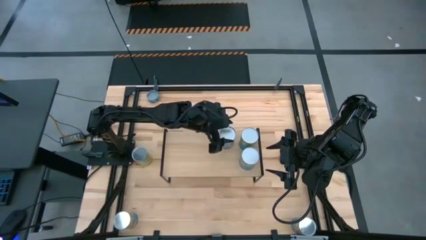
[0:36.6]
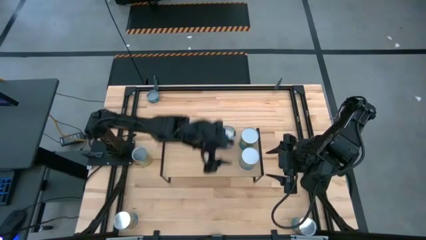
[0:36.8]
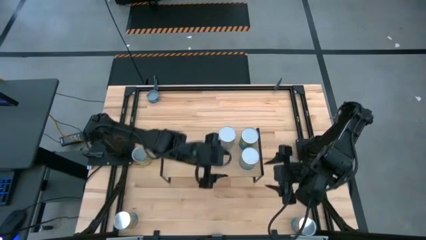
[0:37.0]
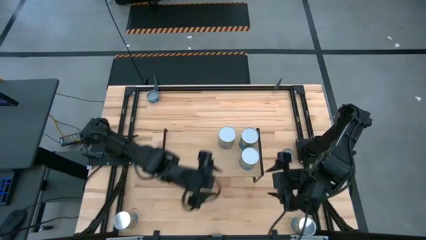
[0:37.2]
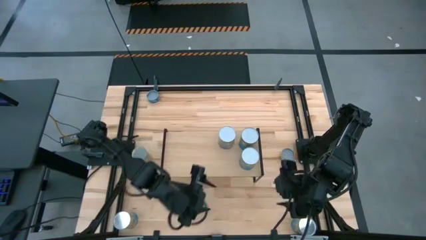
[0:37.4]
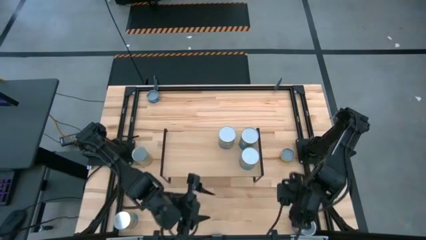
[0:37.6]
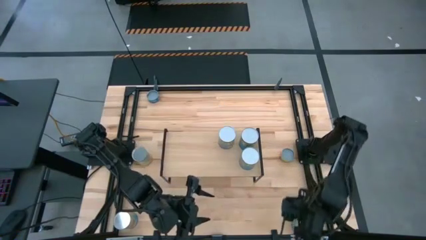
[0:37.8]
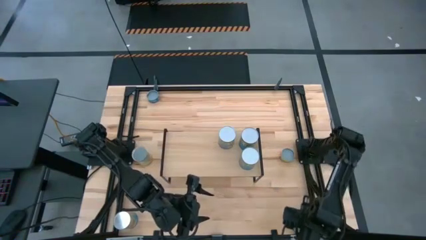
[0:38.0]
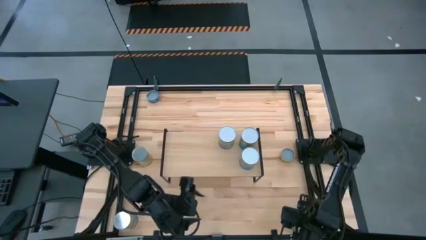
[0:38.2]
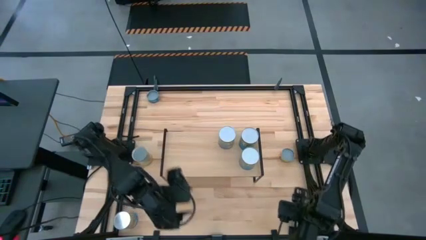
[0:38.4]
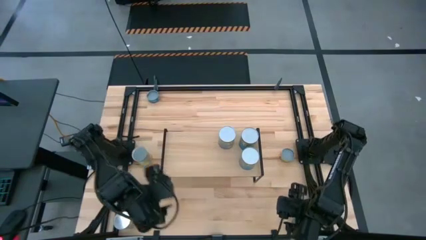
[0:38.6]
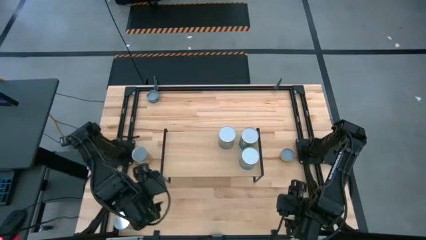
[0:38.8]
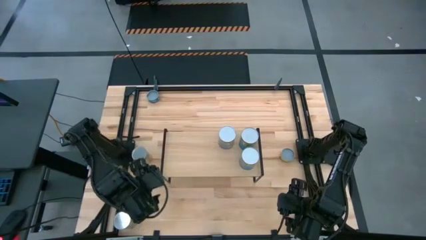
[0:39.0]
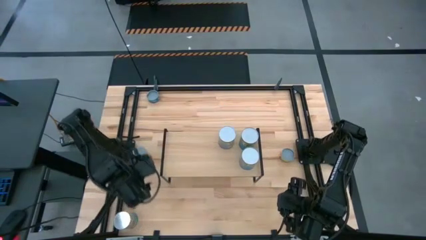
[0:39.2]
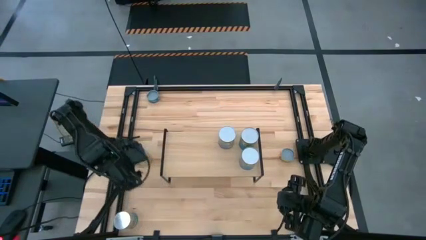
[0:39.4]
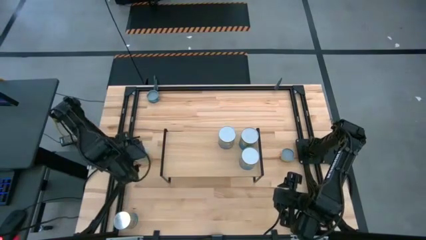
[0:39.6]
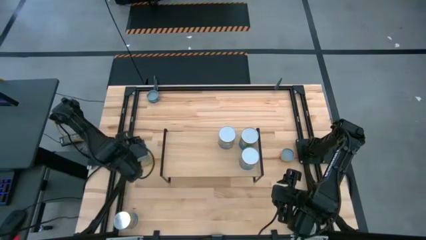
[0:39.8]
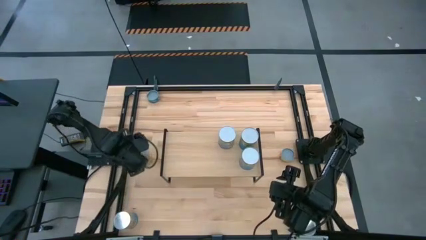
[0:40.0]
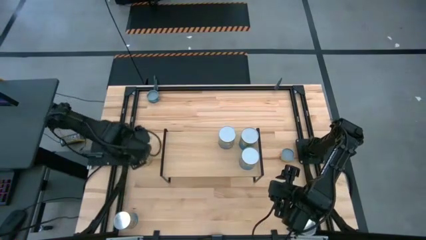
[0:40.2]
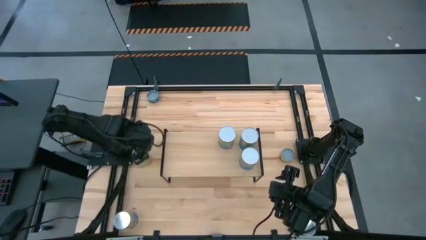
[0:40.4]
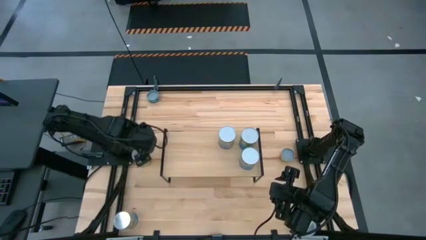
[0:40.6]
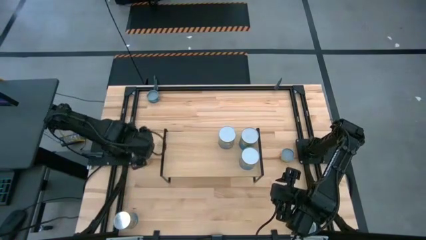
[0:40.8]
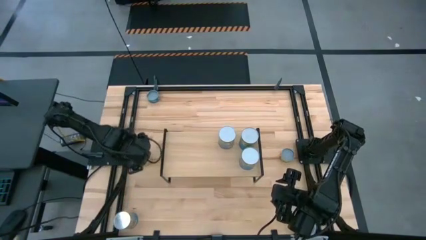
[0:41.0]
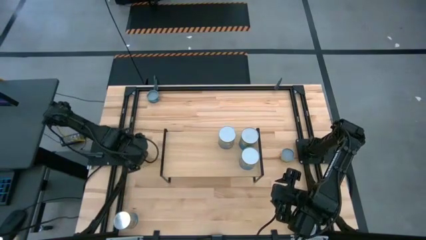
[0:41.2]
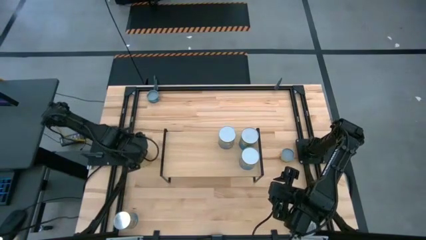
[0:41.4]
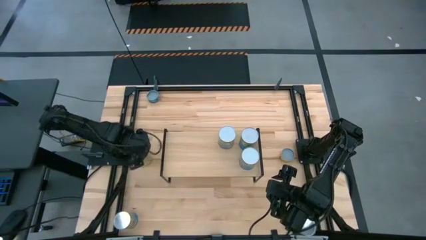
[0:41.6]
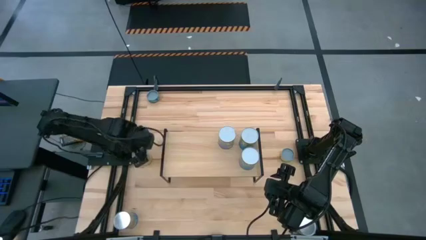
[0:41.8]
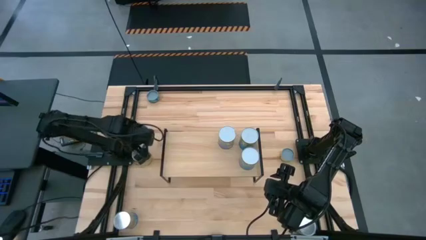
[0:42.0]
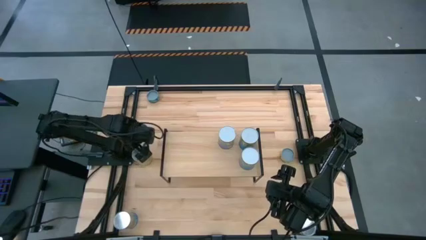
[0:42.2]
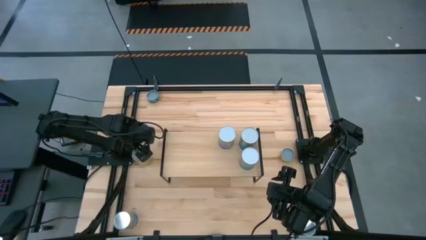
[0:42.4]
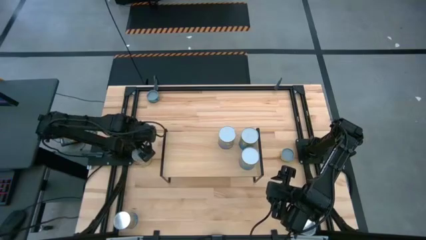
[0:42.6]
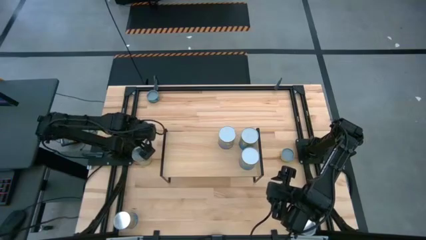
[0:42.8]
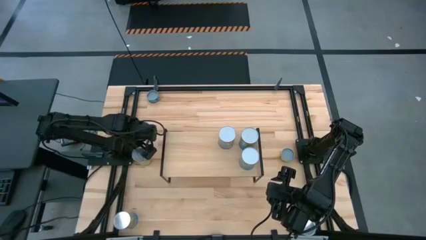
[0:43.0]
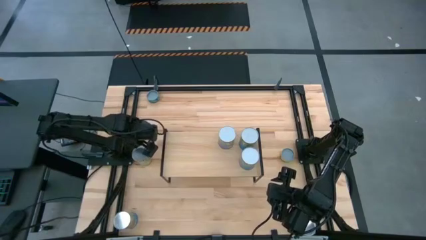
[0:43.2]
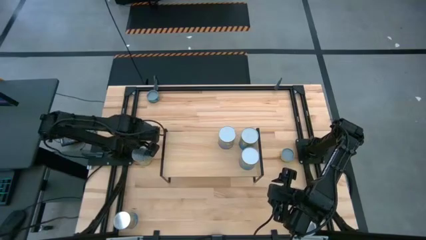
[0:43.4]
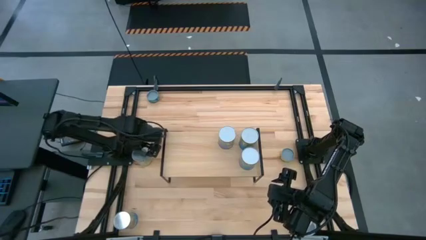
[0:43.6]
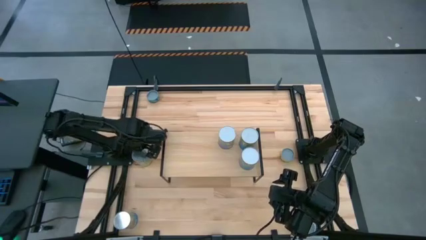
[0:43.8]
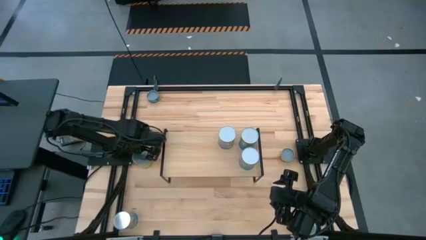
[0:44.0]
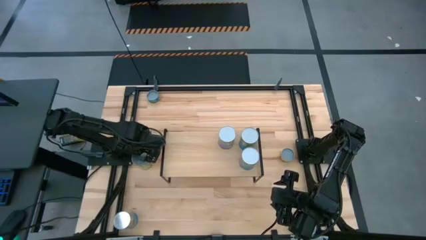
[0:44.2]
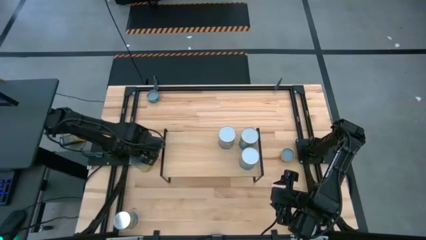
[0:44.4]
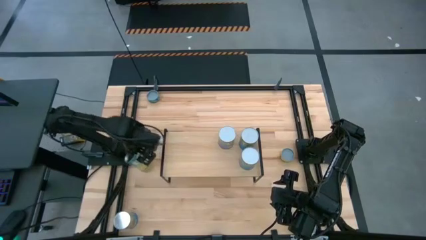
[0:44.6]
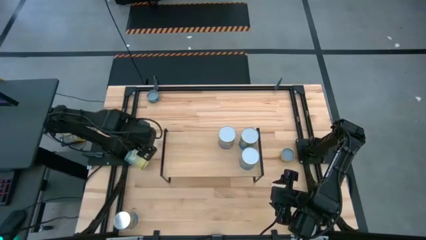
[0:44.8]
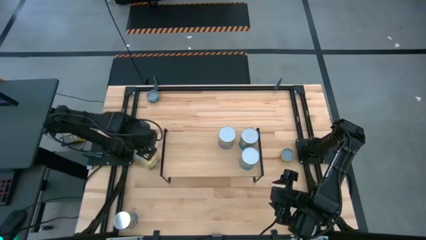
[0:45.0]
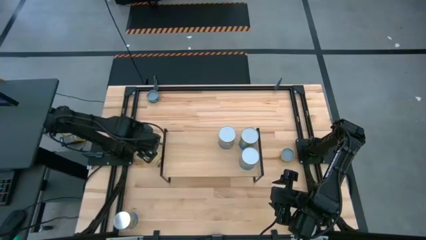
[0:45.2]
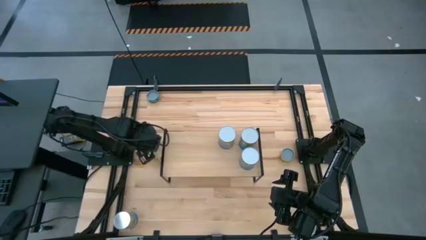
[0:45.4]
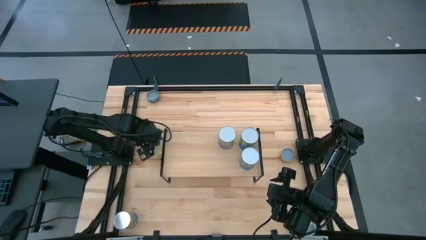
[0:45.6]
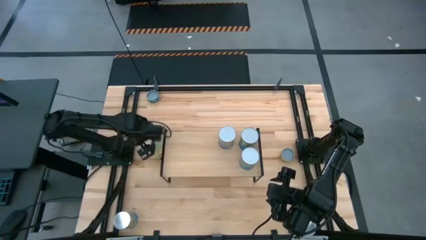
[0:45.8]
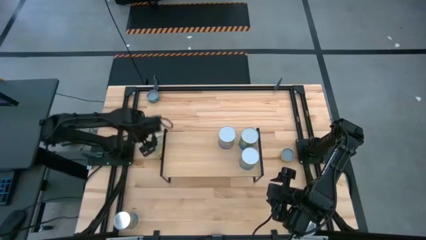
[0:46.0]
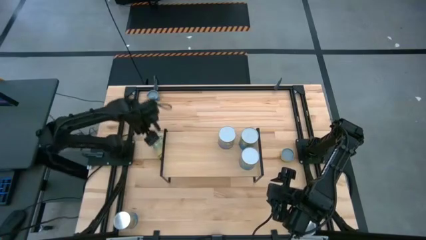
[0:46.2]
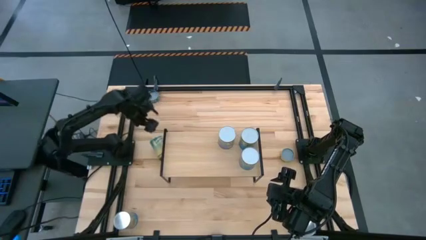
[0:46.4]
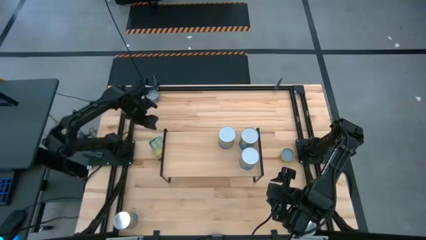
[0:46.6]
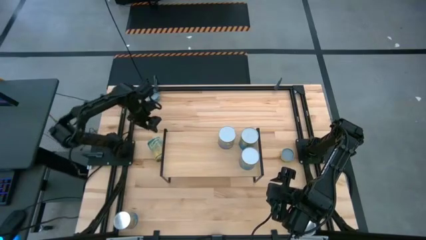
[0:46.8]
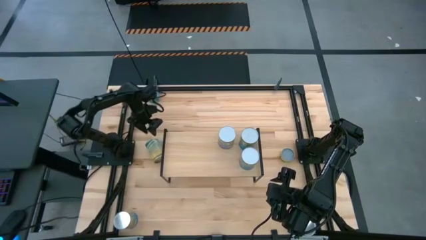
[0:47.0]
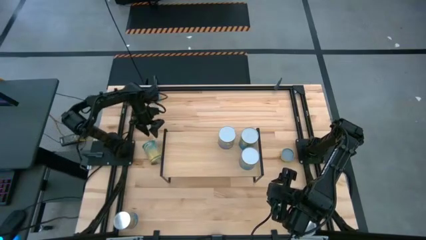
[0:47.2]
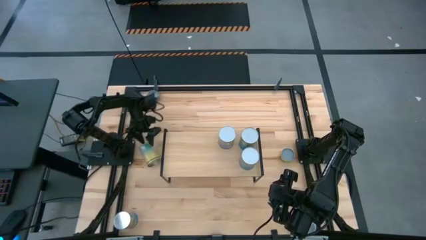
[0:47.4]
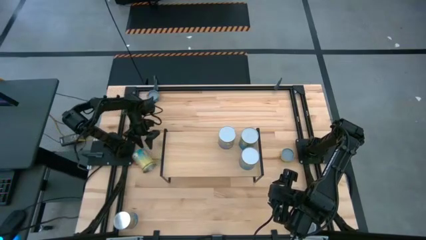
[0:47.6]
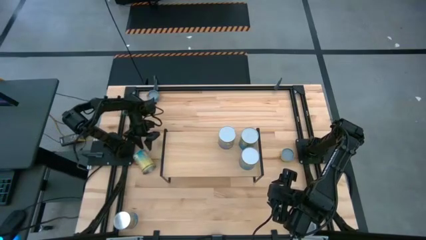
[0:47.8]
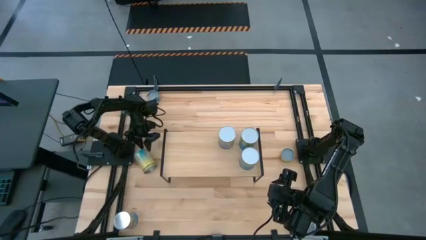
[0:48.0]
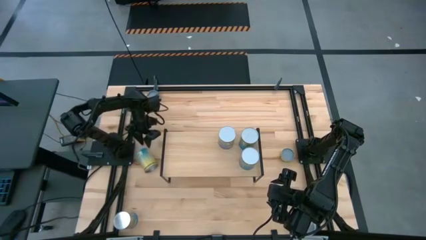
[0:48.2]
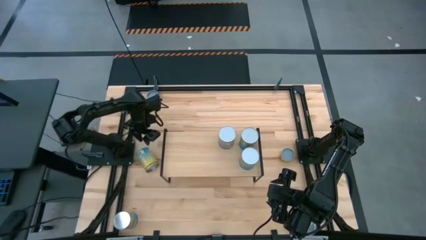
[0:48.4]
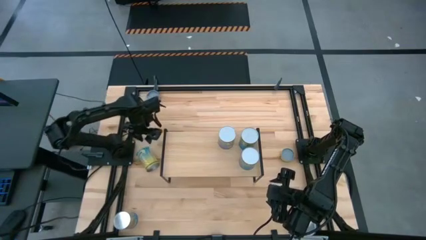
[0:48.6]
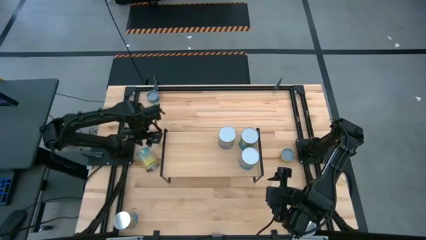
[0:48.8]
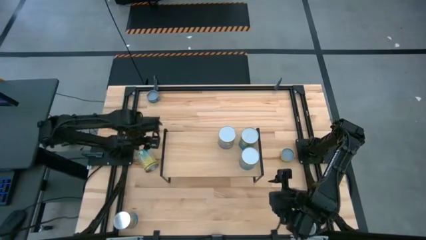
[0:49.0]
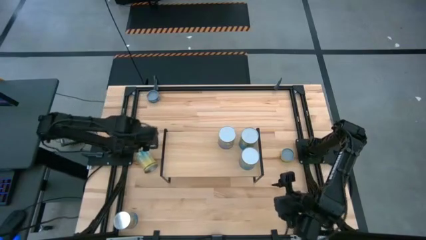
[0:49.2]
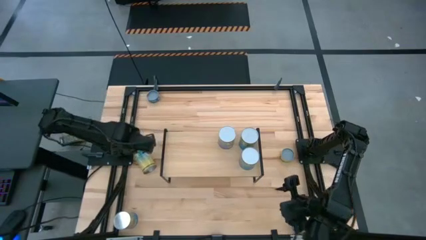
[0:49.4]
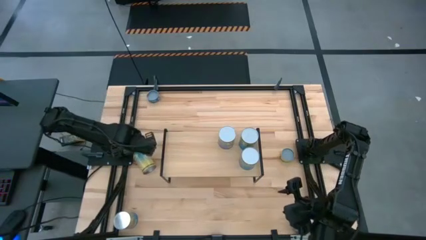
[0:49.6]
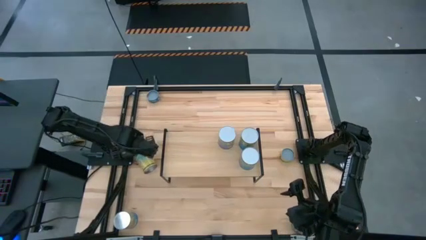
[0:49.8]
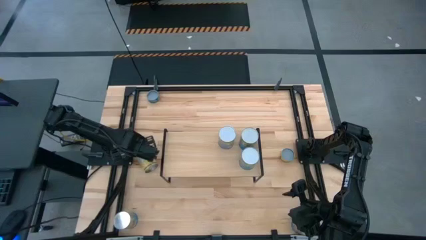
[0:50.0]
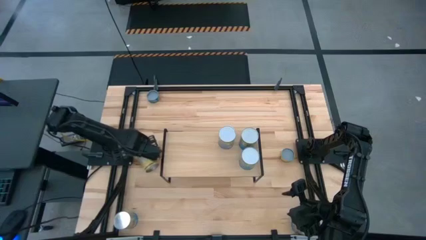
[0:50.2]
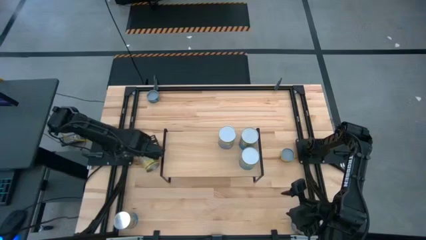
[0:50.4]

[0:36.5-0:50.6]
Task: Pick and place cans onto a shelf
Put the canned carrots on the shelf

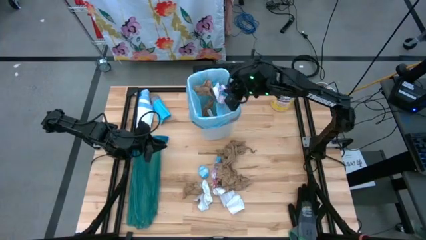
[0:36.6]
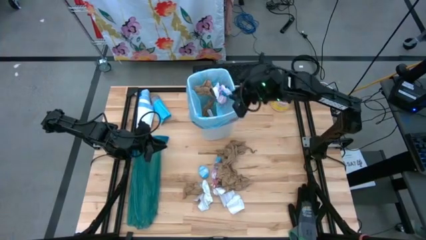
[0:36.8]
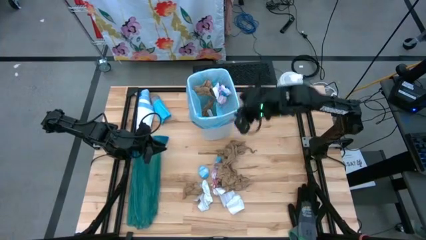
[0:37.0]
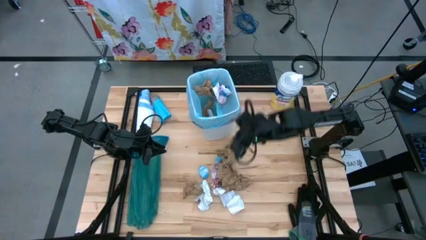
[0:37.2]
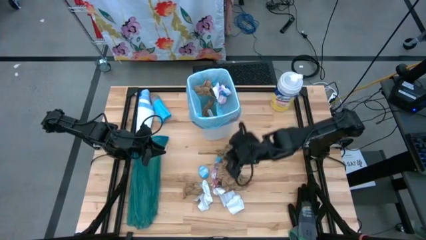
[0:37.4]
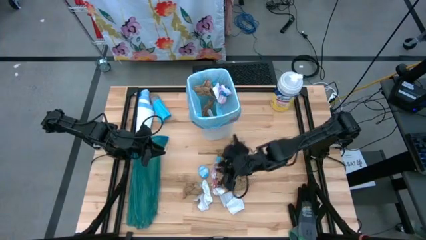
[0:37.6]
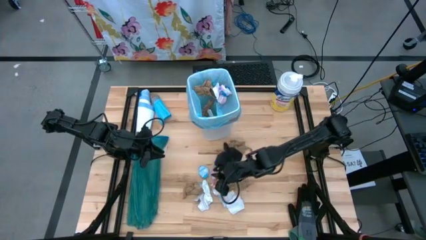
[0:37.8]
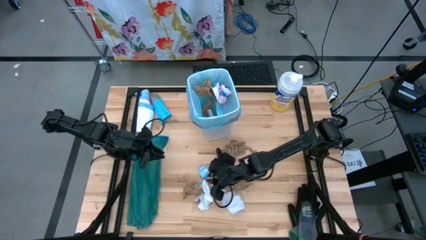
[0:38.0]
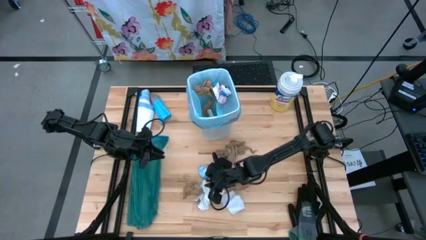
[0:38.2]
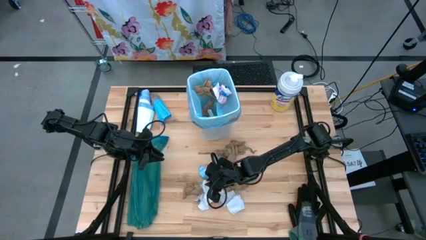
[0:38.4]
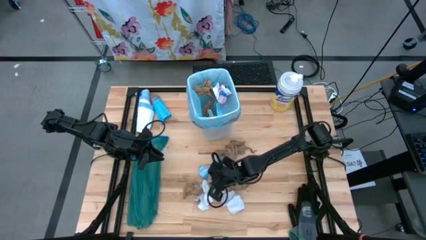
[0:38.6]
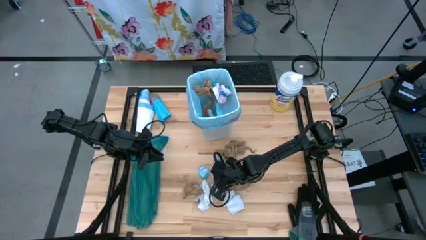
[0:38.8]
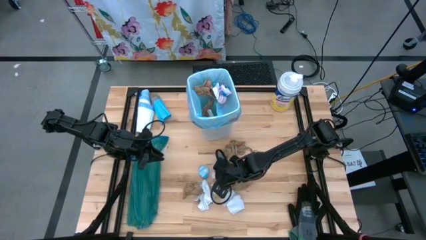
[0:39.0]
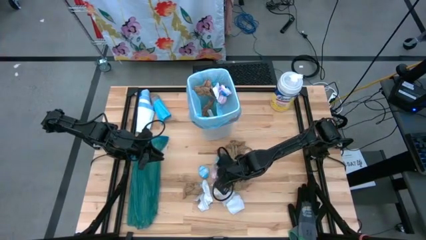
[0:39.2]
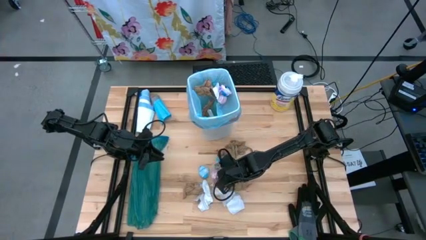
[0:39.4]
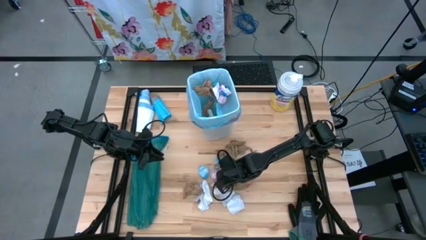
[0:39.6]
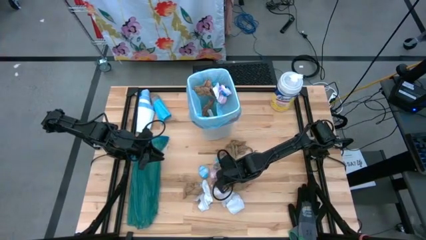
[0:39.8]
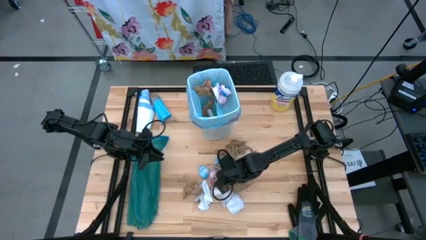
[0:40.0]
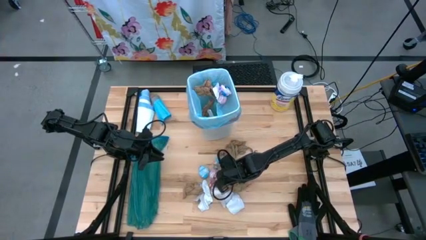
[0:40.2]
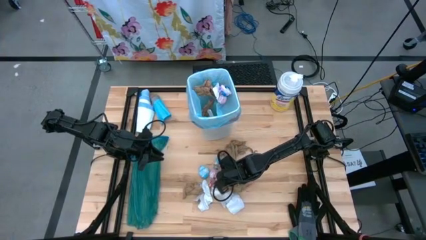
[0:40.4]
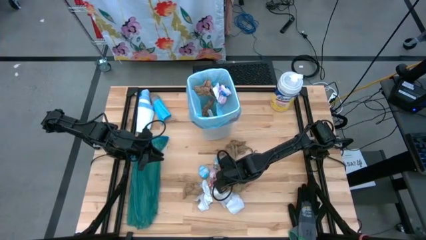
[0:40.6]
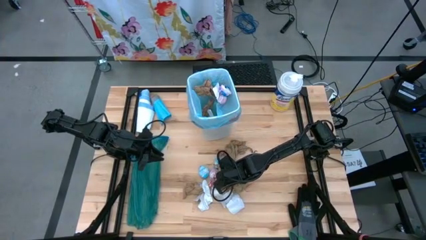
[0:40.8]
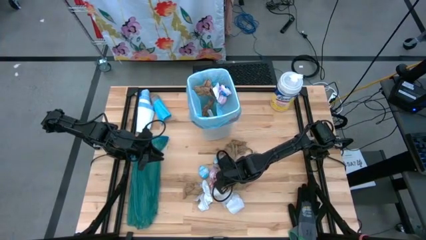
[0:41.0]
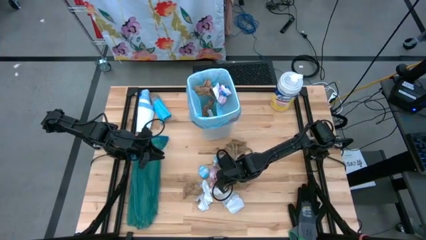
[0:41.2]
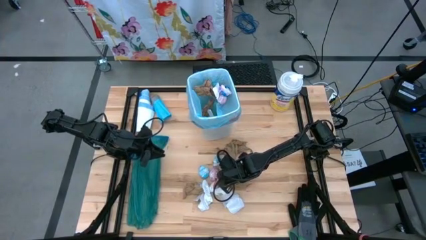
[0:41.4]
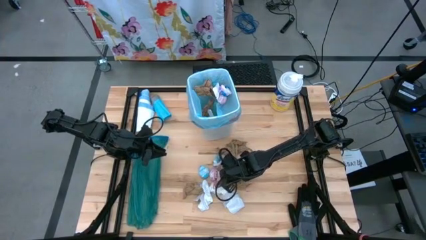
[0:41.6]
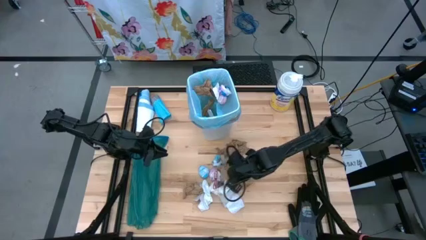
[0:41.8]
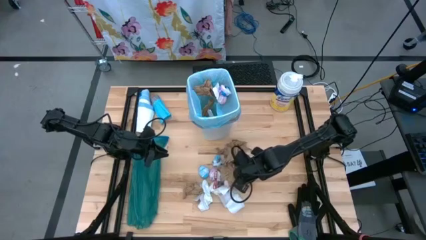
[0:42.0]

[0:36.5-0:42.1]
Task: place trash/remove bag and relplace
Put the brown napkin into the trash bin
